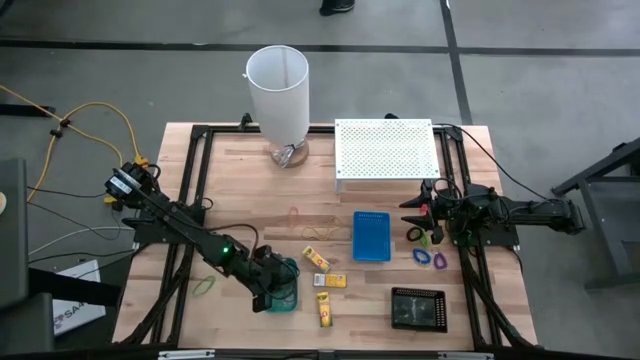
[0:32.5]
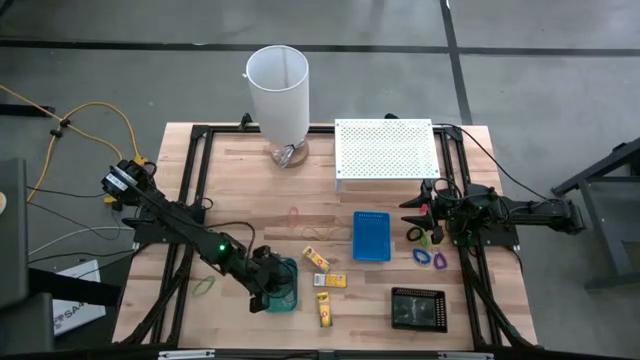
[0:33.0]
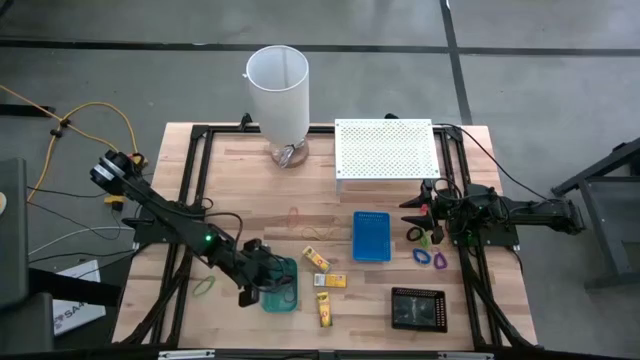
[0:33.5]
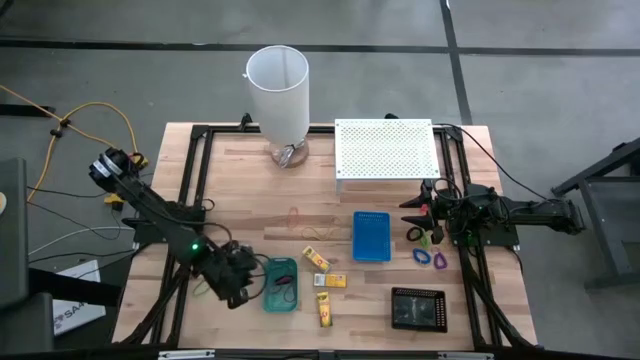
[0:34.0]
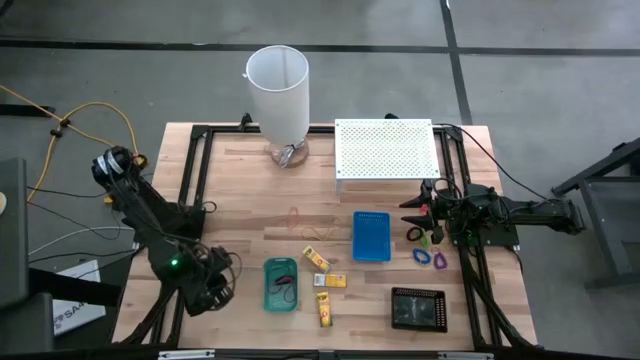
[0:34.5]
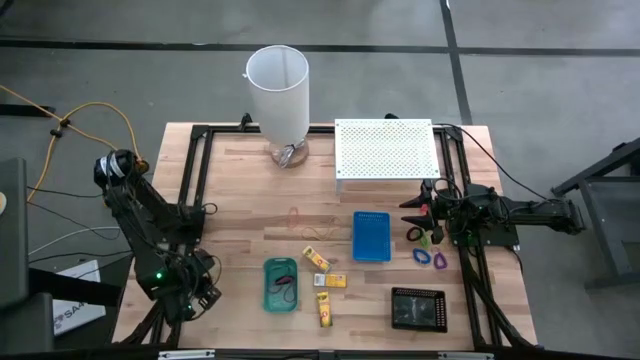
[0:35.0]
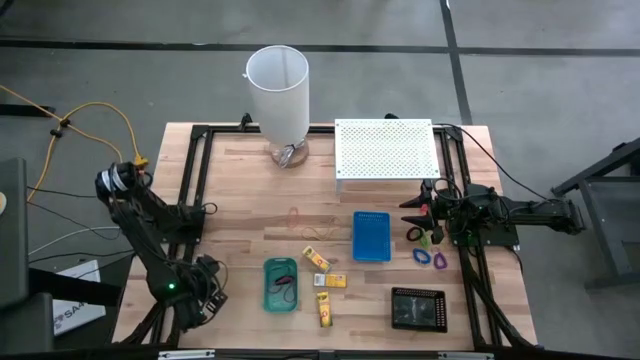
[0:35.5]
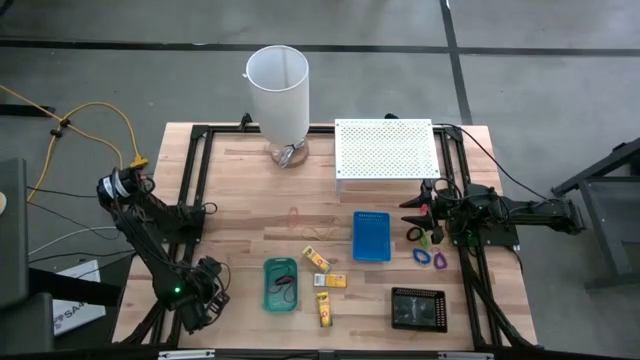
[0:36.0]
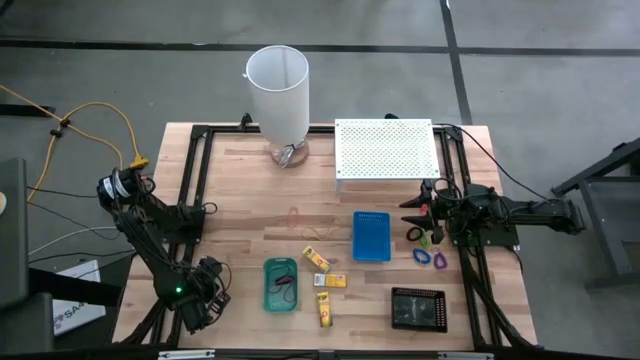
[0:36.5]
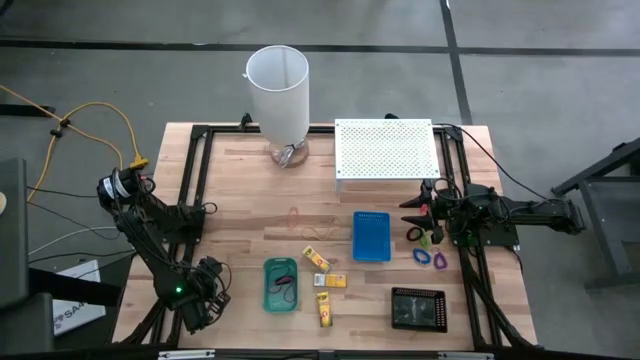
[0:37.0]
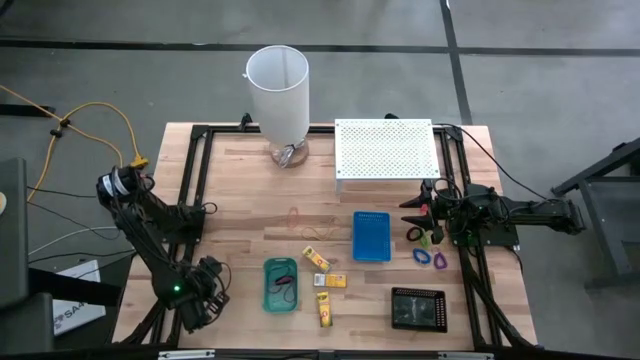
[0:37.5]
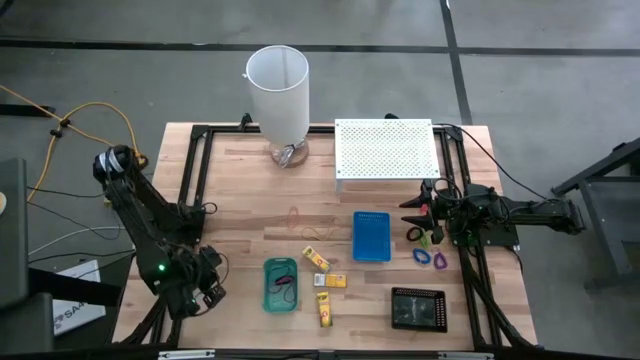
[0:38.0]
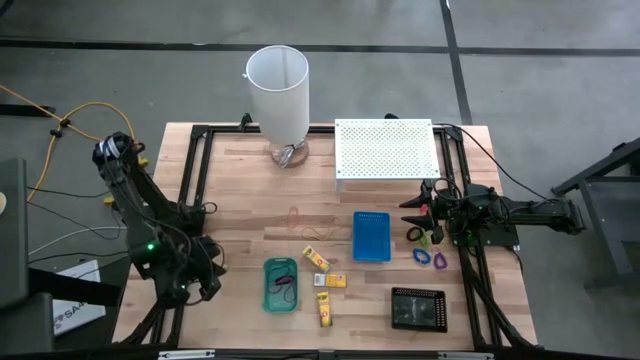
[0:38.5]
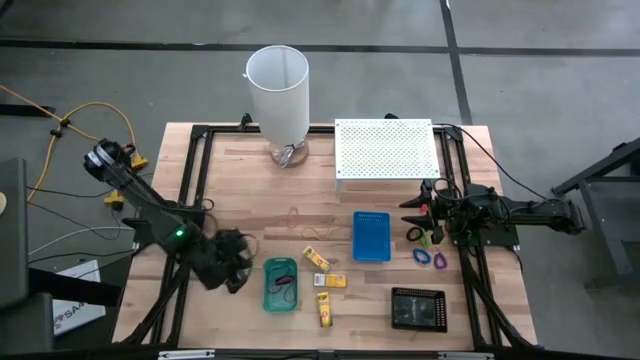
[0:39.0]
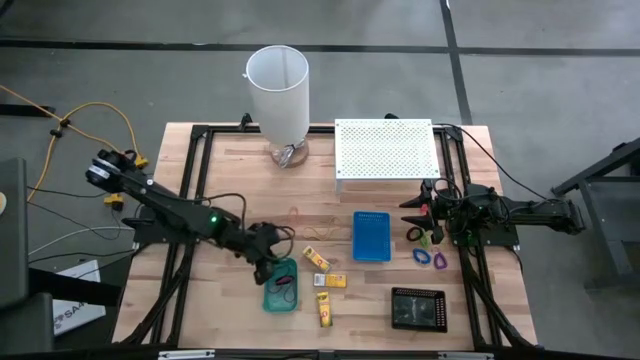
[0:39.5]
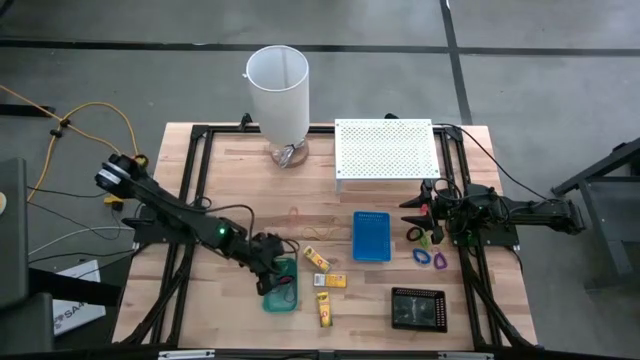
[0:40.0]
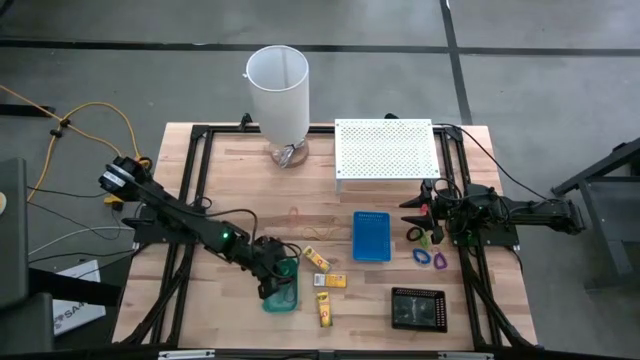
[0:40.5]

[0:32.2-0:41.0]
Task: Pick & Place Office Desk Supplies
Put the green rubber band into the green bin

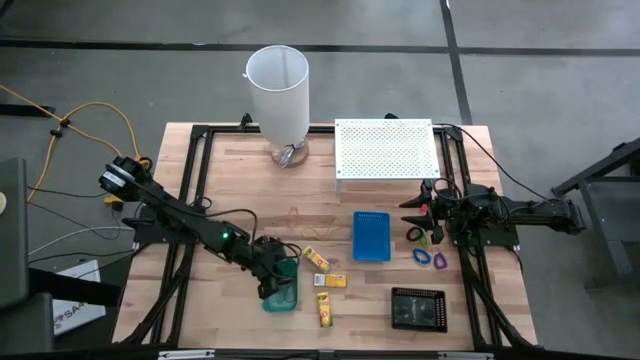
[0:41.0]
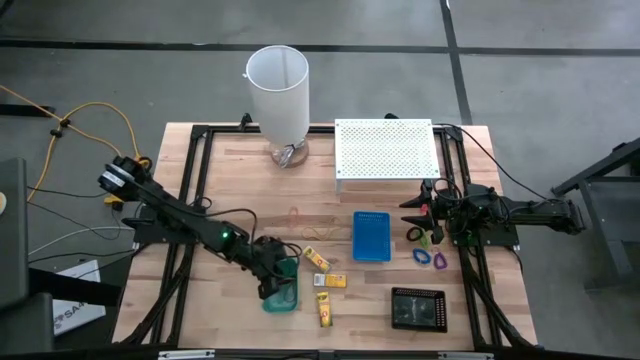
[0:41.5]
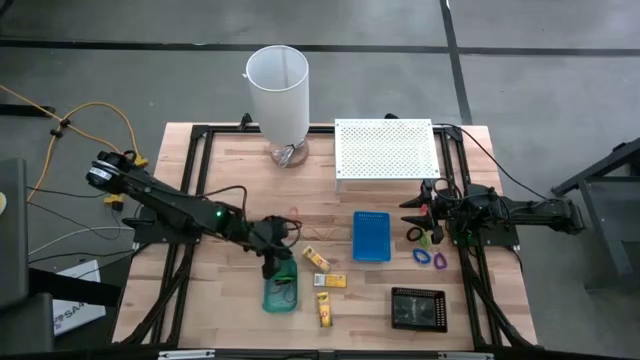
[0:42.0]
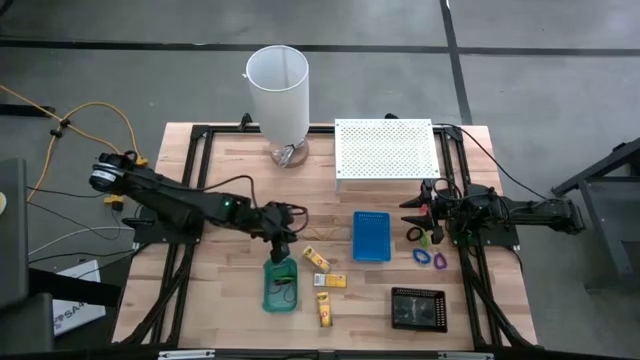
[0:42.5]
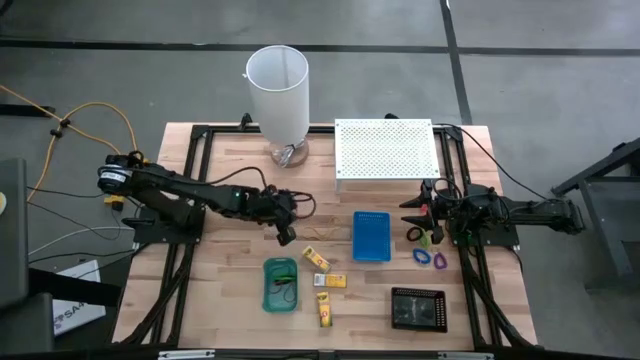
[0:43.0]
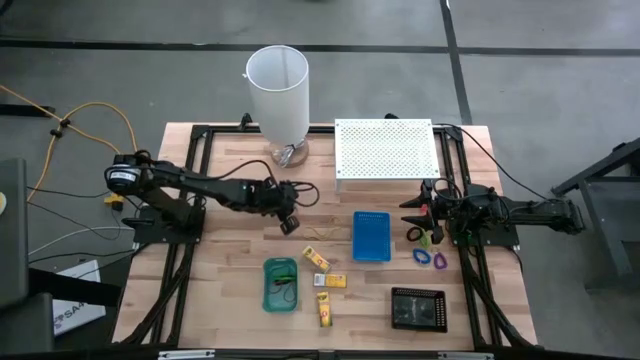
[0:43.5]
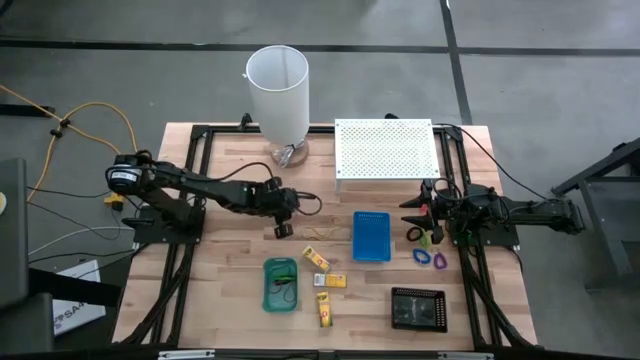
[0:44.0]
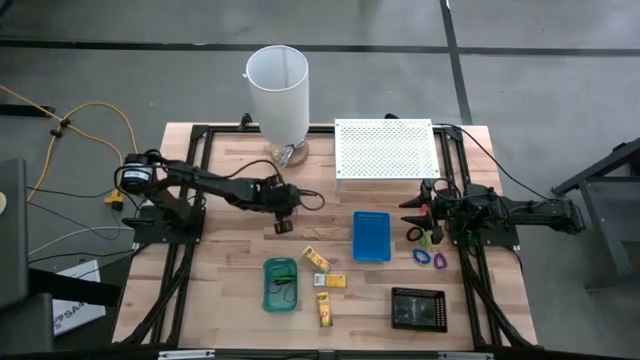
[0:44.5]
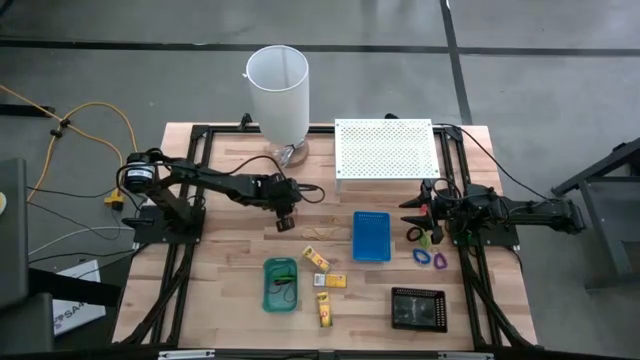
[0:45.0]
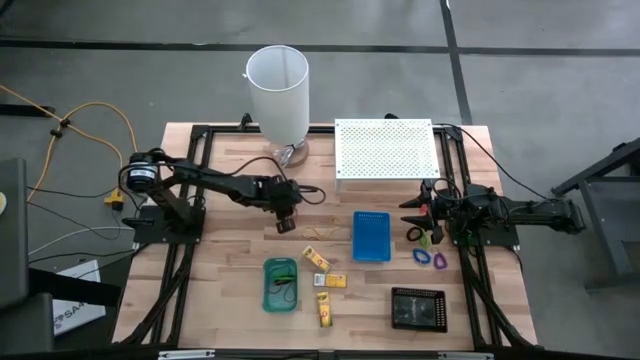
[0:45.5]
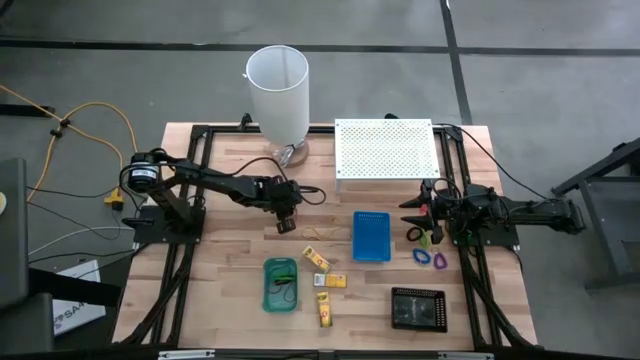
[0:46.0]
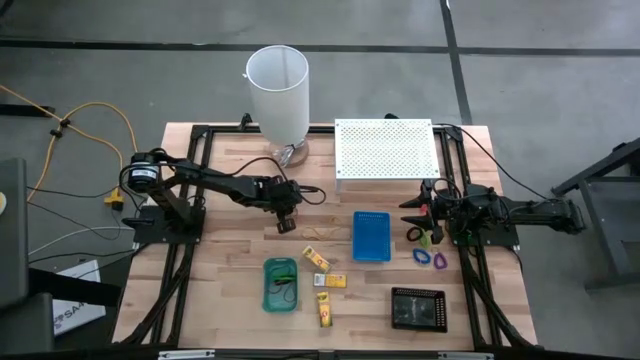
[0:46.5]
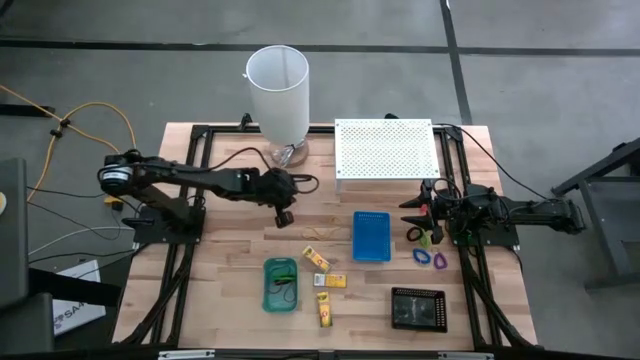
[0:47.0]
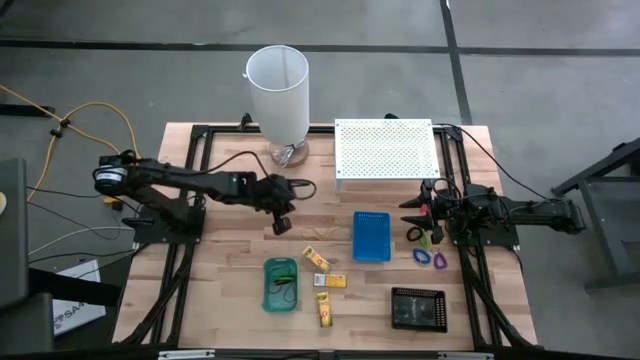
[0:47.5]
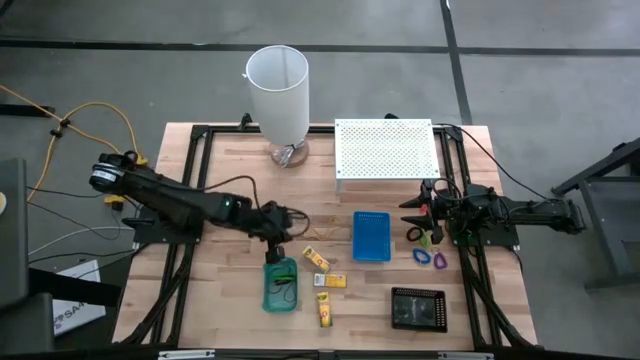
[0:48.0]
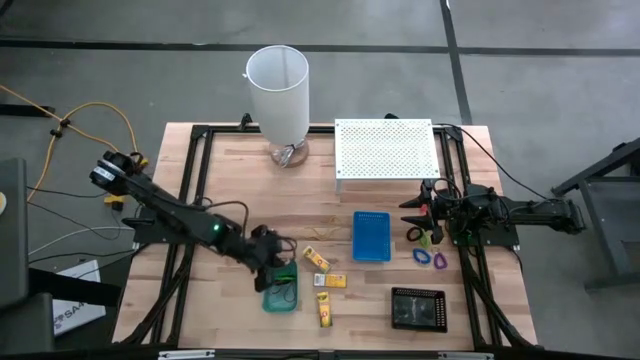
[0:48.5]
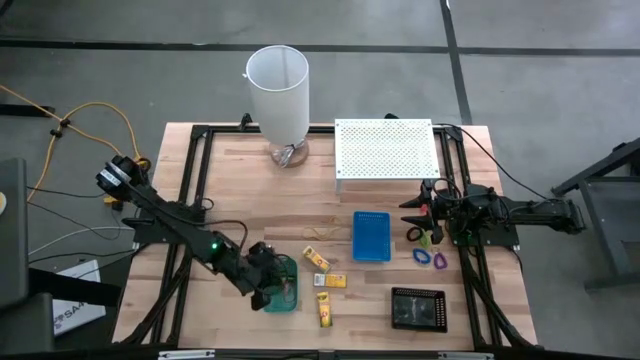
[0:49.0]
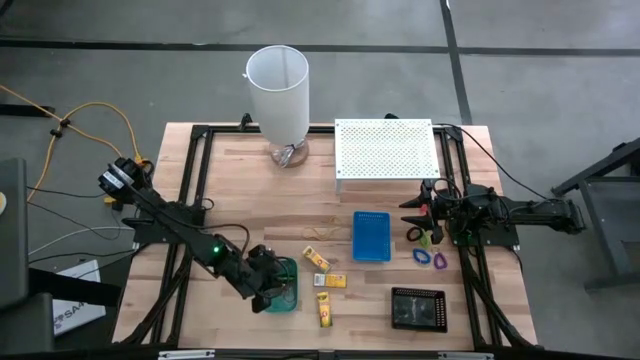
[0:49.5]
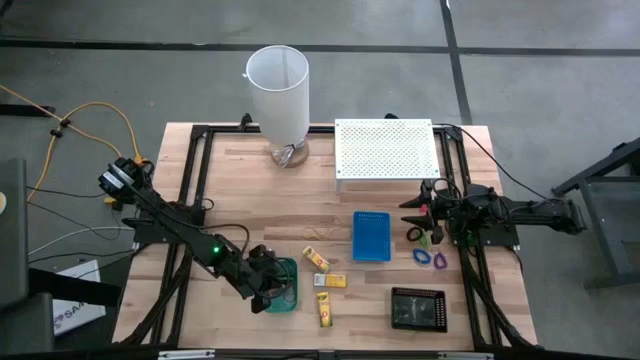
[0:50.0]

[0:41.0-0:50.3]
Put the orange rubber band into the green bin

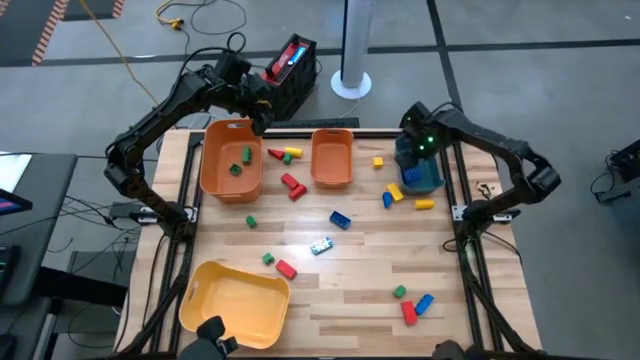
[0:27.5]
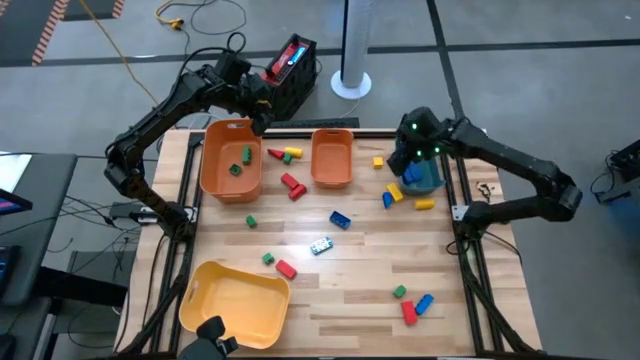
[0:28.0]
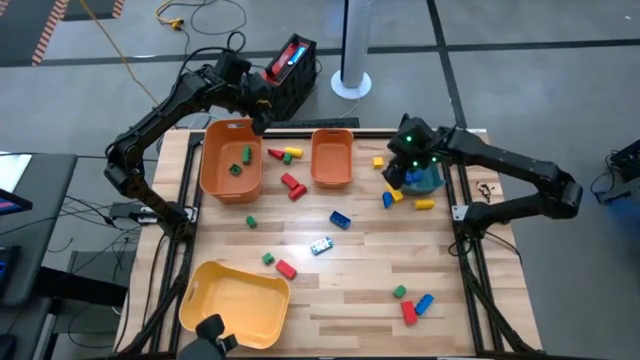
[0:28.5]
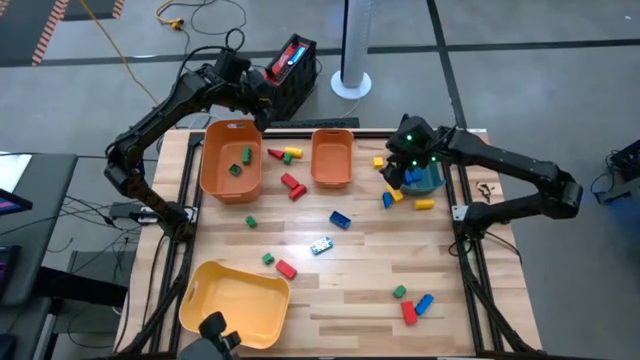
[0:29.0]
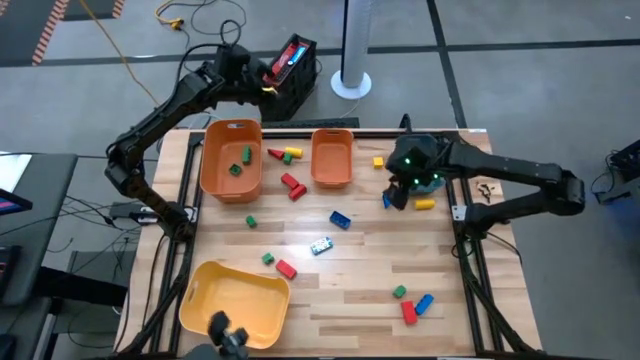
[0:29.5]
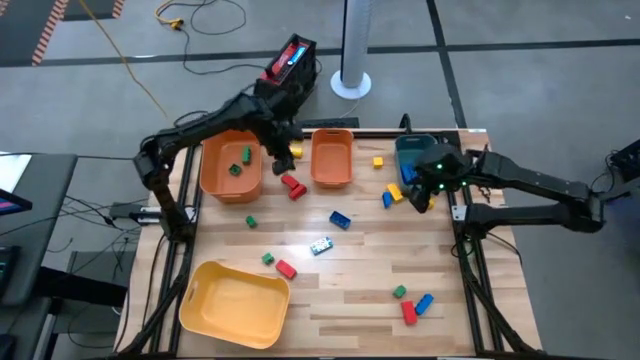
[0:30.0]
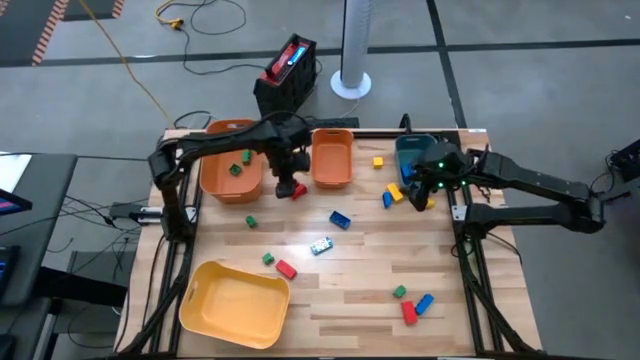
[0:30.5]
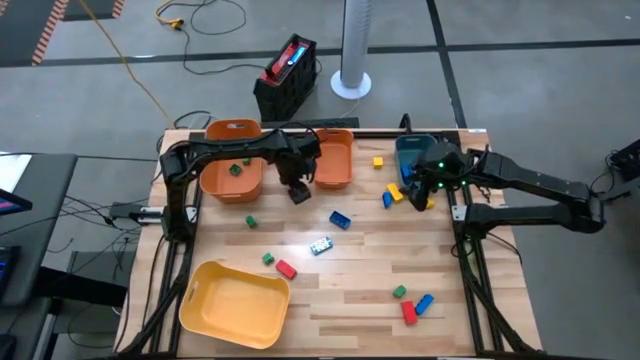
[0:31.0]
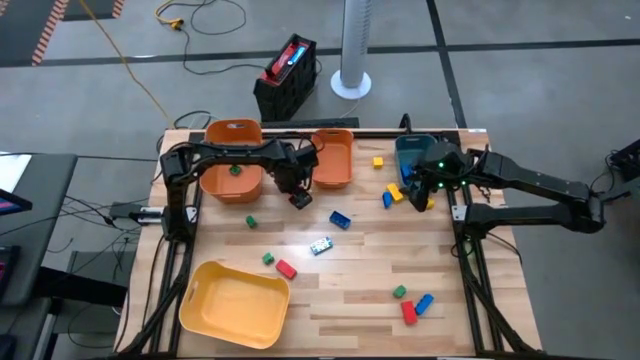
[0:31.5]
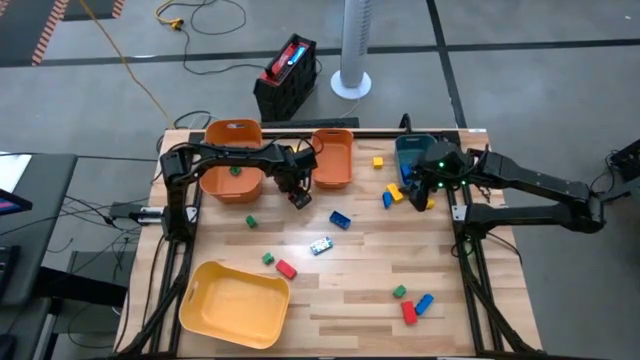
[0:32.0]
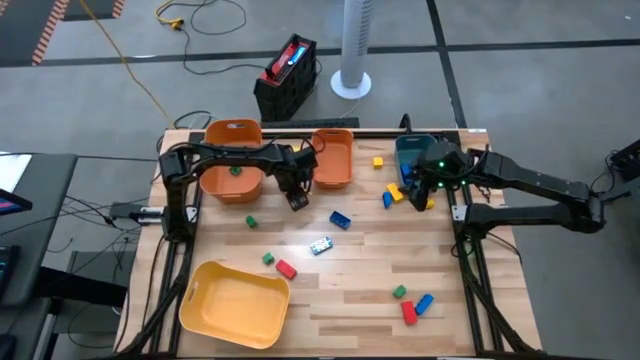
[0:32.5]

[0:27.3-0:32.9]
Task: Sort blocks
Put the red block into the right orange bin
